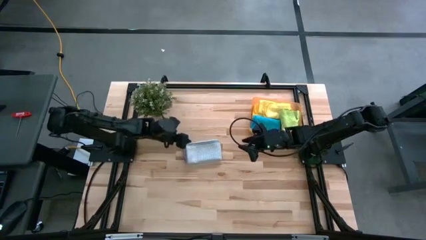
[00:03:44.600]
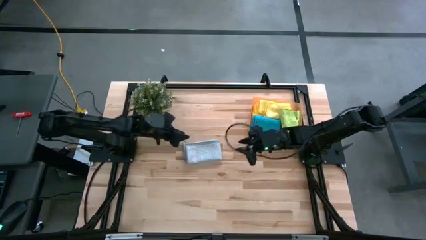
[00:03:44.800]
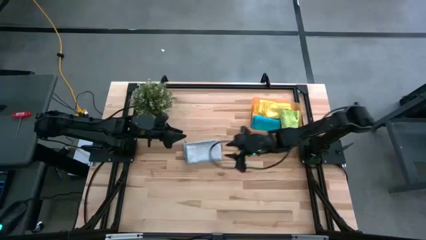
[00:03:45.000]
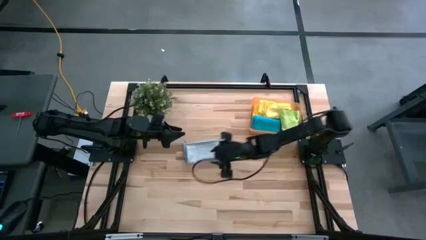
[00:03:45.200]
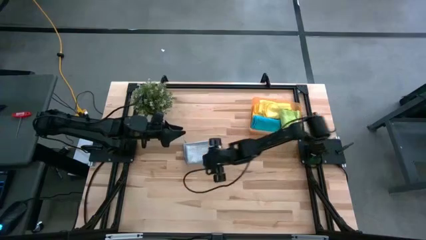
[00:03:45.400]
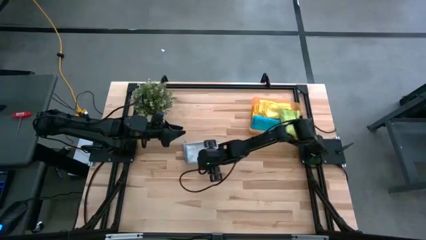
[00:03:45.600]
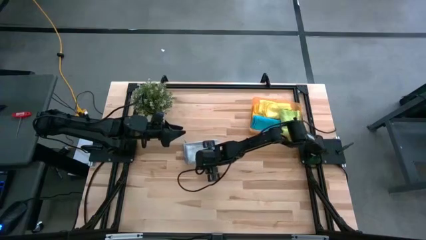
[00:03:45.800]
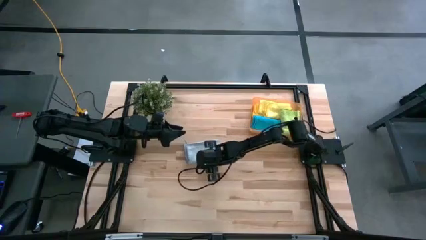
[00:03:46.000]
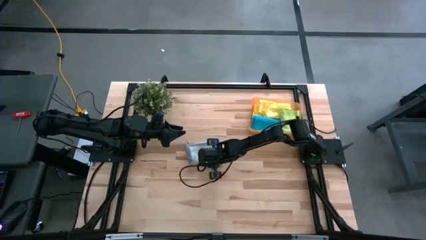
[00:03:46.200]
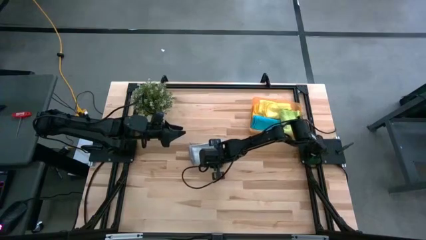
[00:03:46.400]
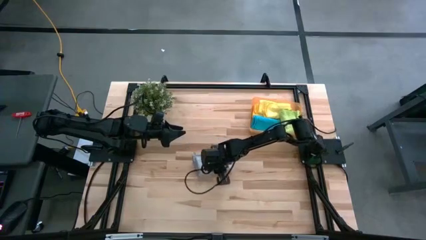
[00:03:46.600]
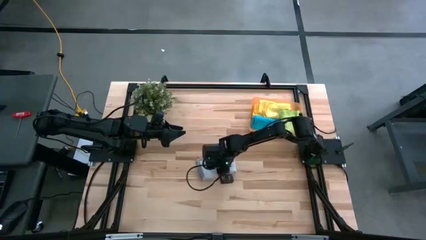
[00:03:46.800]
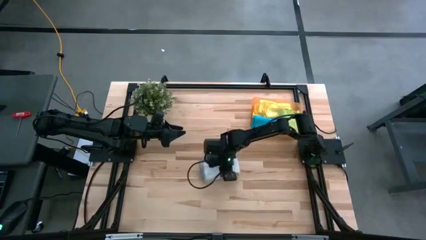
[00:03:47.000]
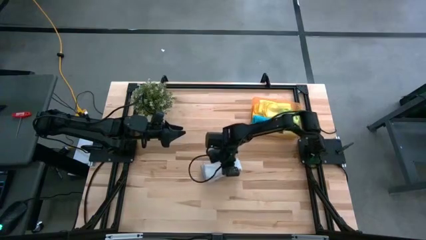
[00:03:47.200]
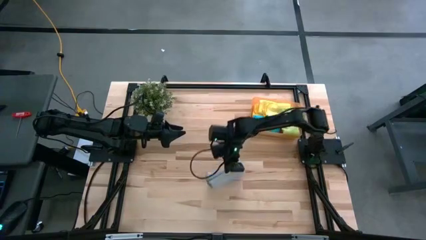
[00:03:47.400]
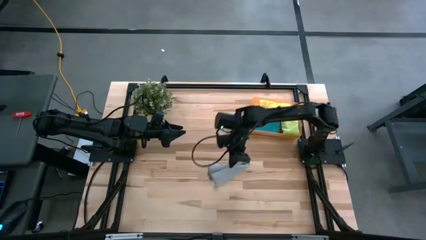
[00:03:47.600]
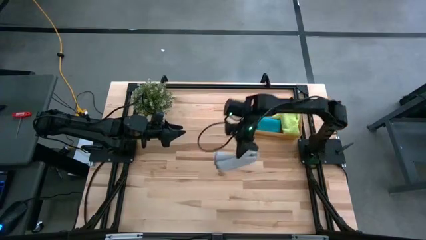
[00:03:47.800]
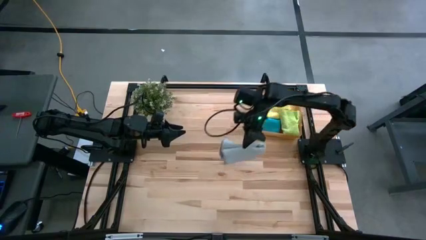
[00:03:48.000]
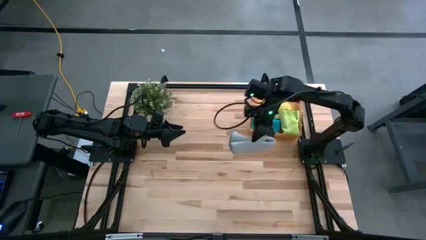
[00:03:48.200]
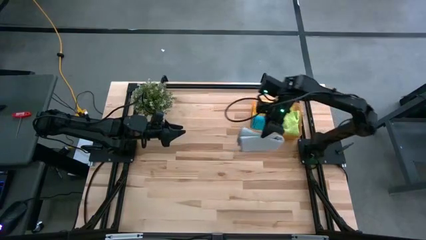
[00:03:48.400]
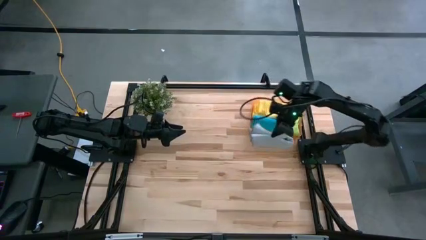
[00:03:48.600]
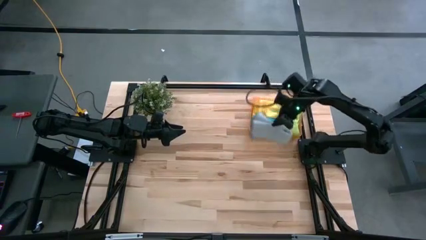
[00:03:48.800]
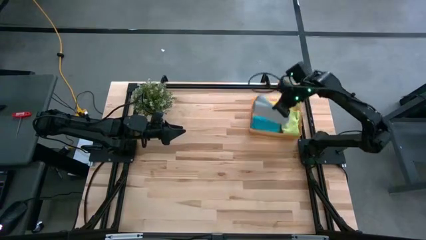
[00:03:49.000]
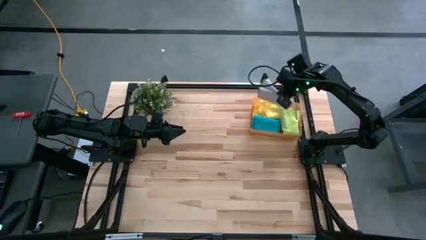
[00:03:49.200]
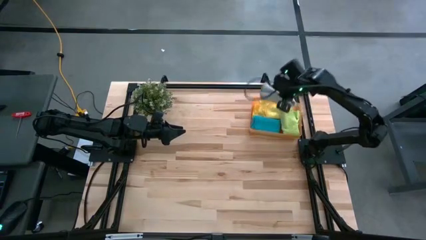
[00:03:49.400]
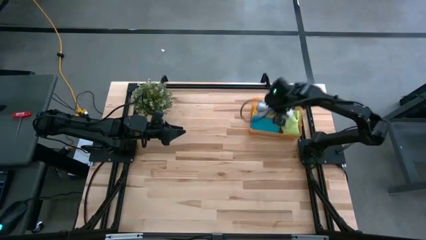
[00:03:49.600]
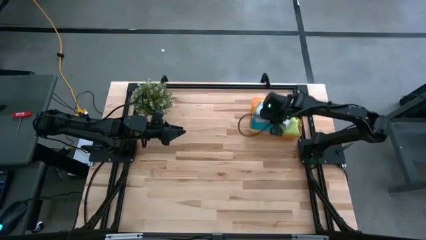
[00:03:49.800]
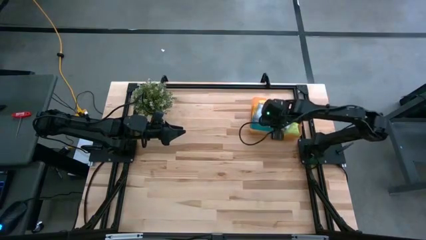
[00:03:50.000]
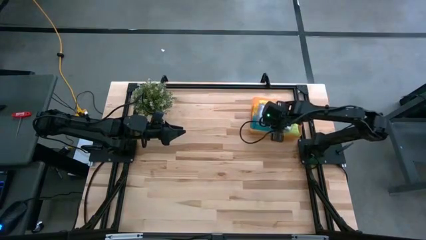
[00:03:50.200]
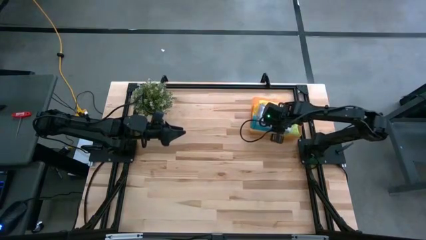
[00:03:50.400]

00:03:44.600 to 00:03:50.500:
Task: Fold microfiber towels
Put the gray microfiber cloth into the orange bin

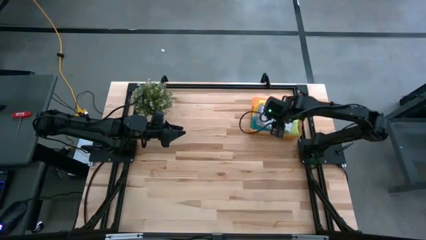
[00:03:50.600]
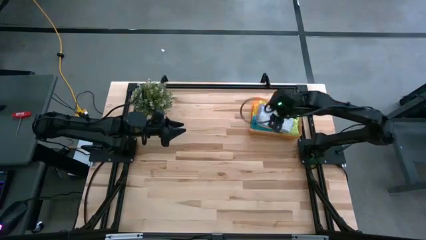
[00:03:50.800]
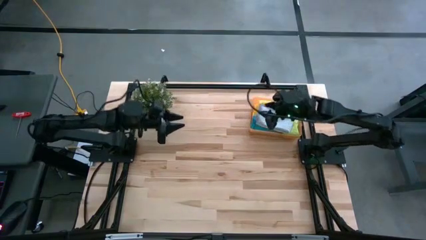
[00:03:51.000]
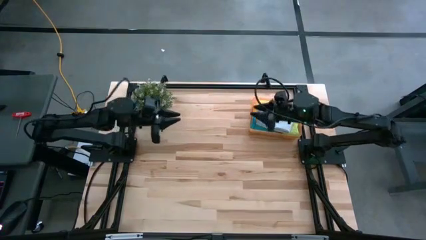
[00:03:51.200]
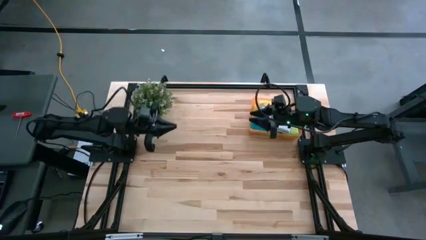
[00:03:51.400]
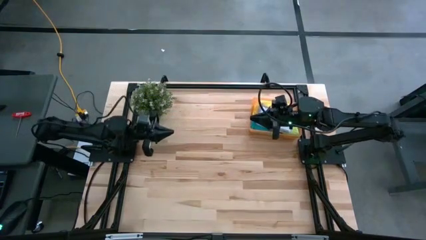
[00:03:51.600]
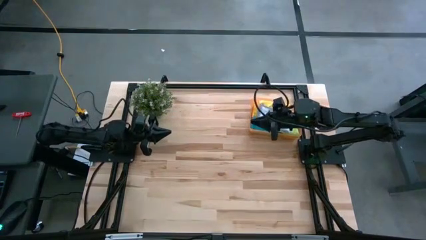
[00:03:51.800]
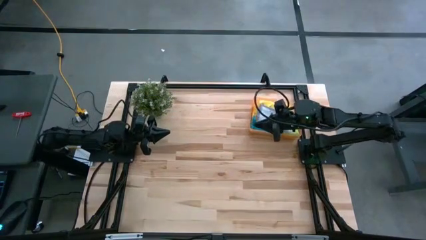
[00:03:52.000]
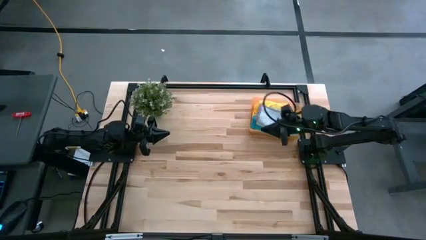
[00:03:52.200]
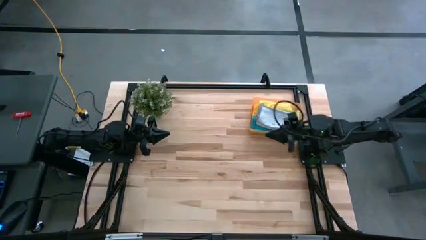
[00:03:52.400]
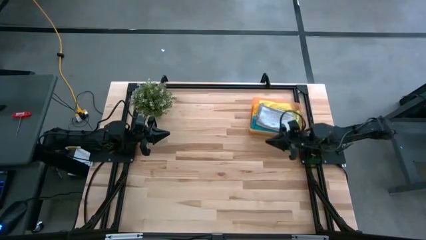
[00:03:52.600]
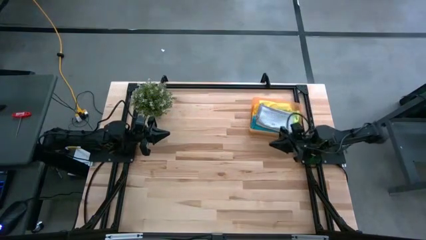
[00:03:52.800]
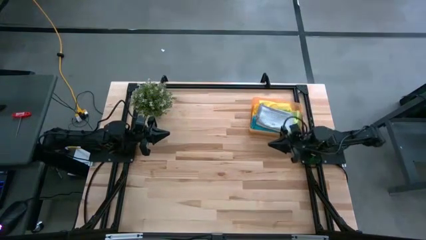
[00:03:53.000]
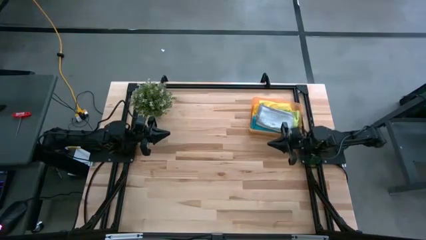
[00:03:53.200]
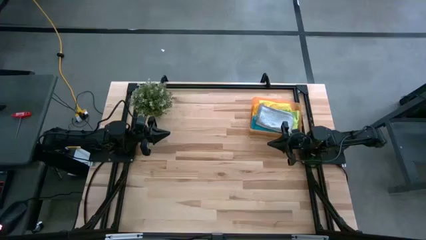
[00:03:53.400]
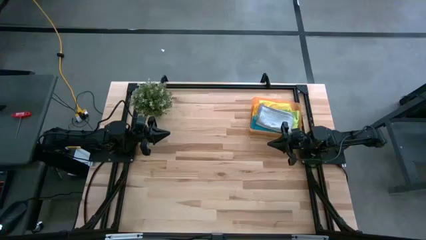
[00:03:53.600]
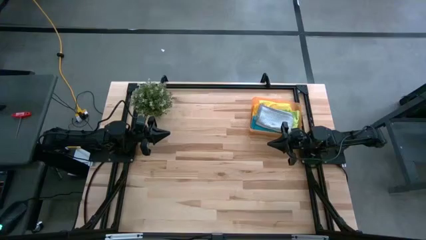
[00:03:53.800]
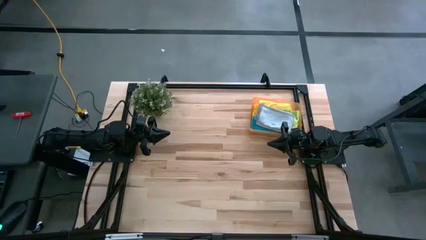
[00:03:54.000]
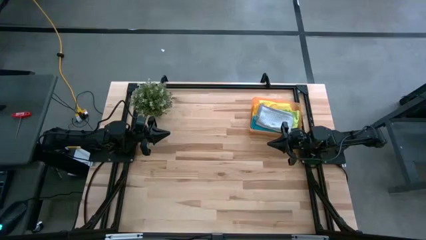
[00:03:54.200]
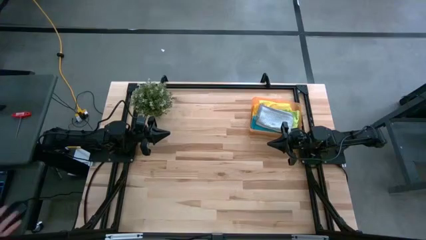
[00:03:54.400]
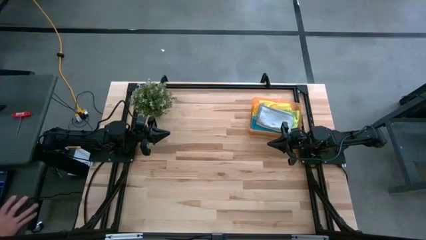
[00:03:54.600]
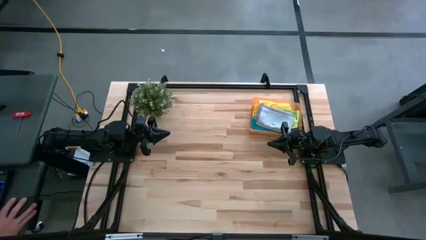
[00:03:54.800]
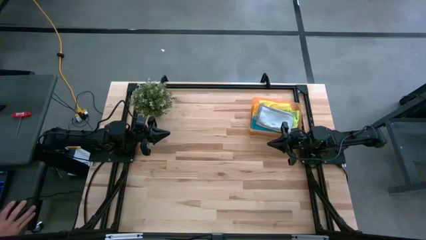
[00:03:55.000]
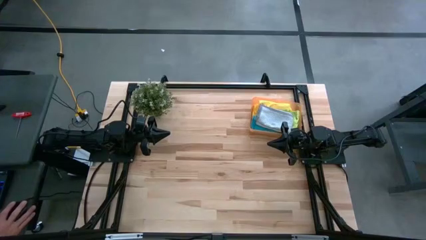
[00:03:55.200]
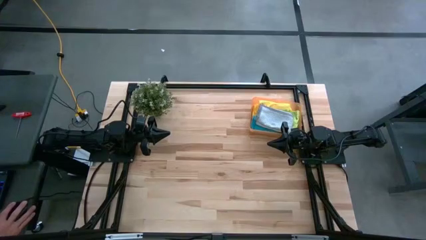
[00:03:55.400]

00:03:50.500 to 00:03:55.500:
Return to Home Position

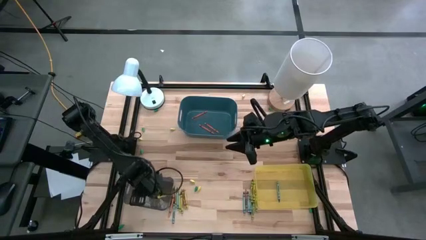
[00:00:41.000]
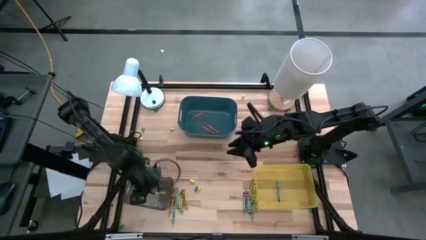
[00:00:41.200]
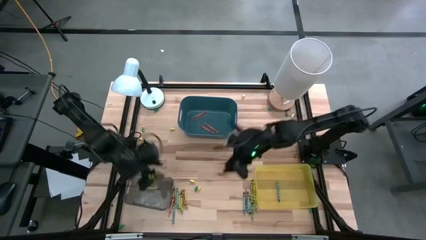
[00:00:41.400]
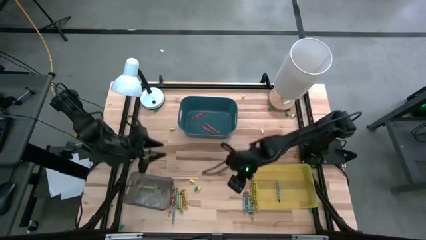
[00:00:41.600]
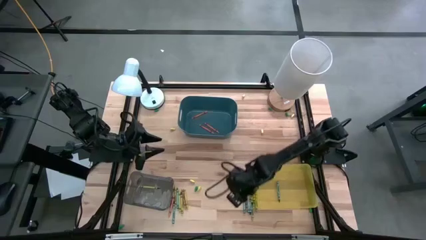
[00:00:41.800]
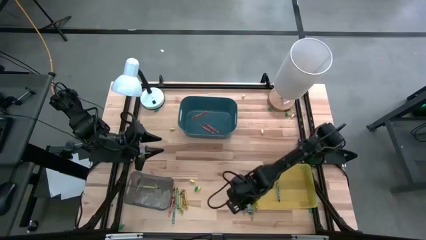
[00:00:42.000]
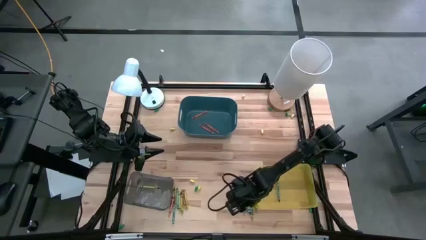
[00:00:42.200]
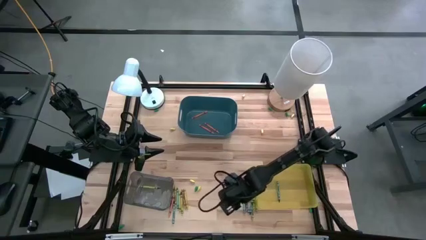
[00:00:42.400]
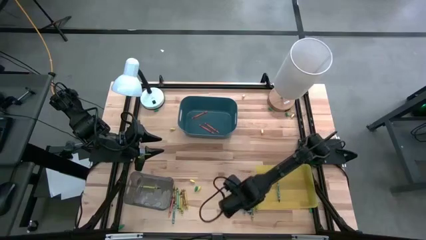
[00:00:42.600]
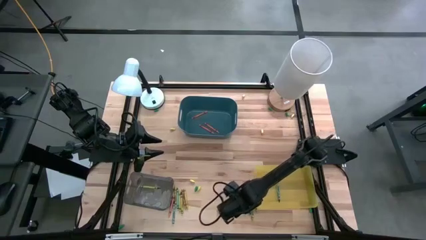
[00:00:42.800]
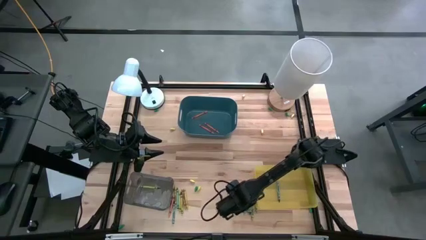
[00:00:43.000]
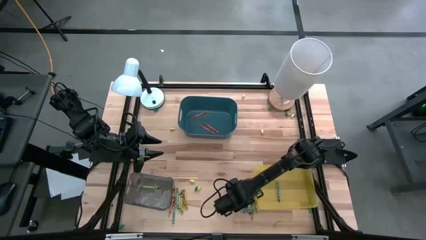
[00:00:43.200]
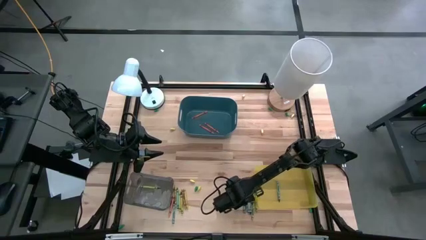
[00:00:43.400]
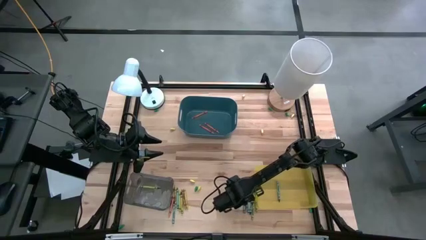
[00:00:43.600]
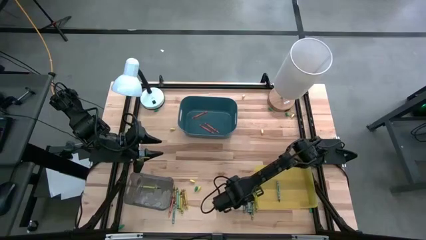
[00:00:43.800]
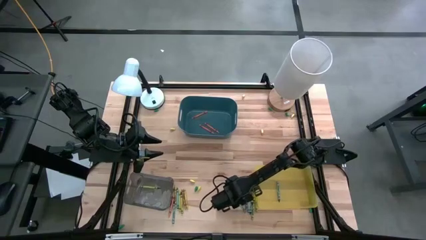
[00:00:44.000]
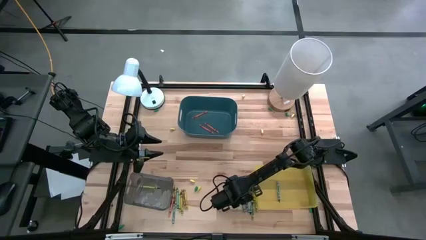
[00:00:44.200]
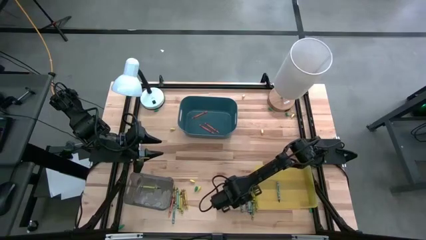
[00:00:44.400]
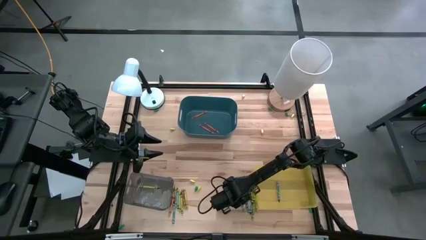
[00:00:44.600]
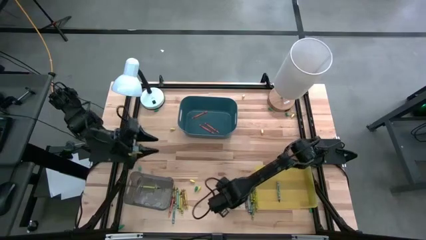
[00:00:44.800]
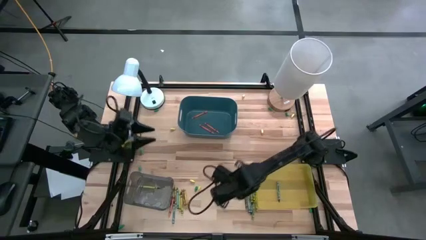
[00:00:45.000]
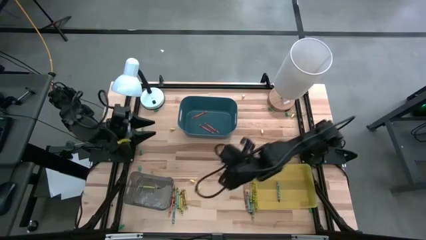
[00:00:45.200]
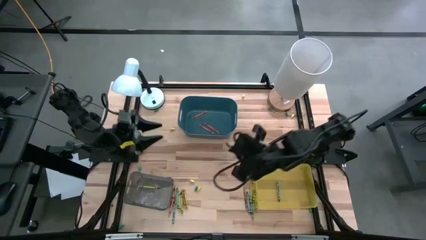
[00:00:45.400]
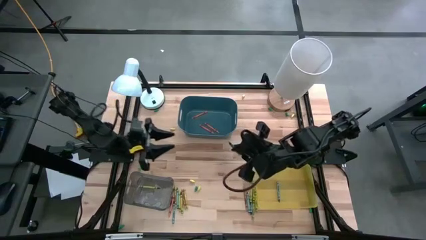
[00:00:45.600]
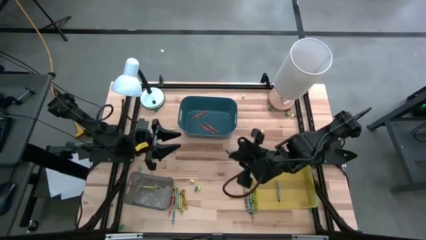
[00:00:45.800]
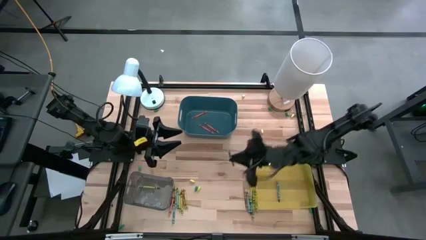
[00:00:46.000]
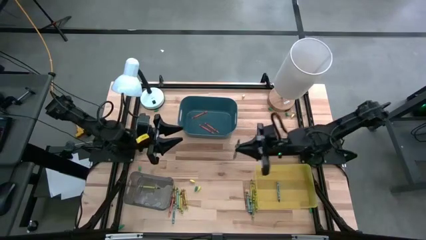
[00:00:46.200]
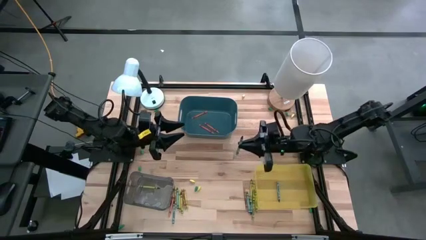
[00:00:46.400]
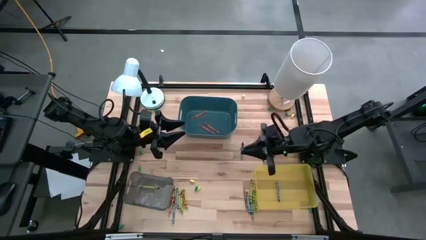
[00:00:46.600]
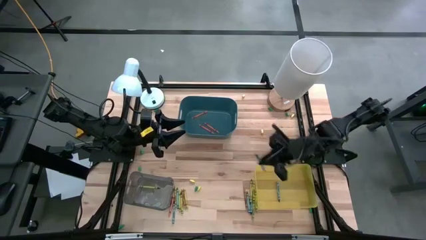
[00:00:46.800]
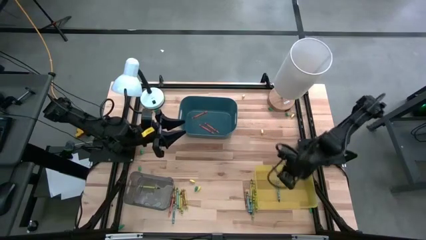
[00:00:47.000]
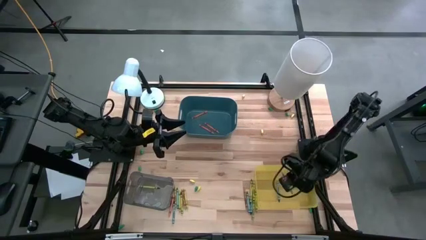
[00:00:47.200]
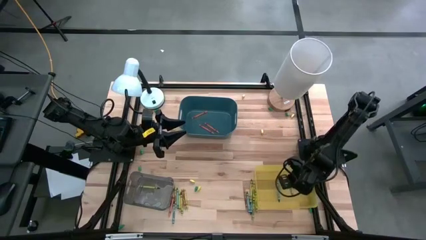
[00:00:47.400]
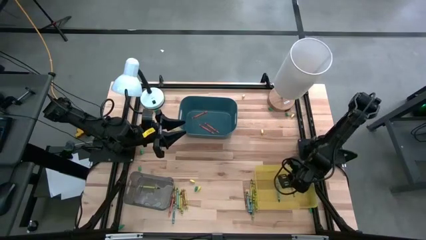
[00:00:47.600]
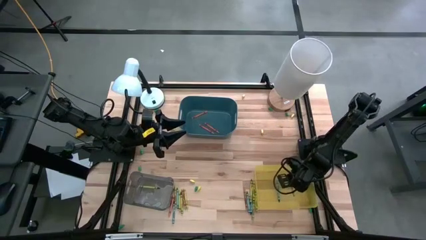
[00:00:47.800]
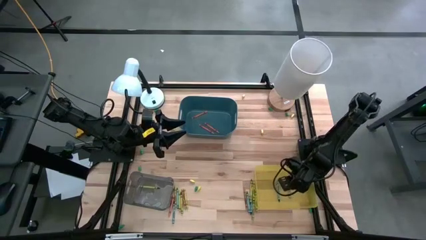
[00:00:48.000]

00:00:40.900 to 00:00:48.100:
Task: Sort crayons
Put the blue crayon into the yellow bin
